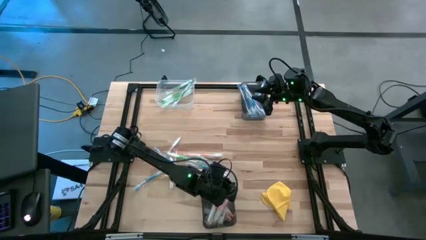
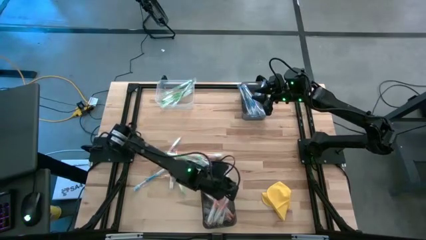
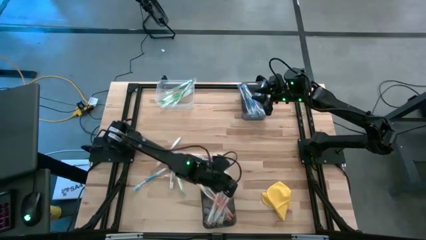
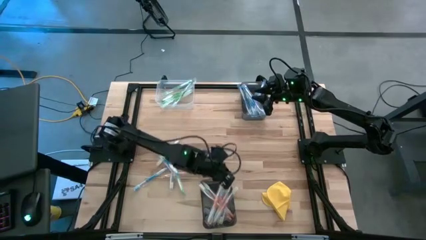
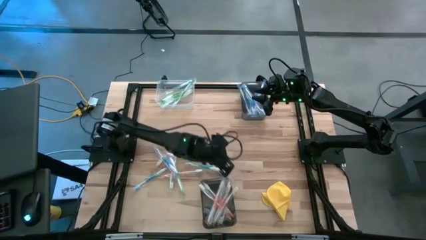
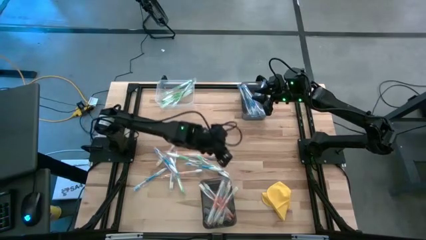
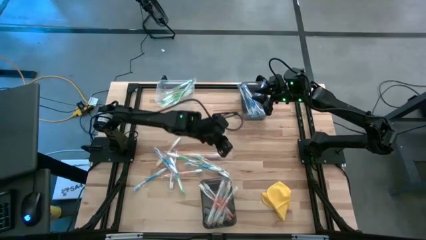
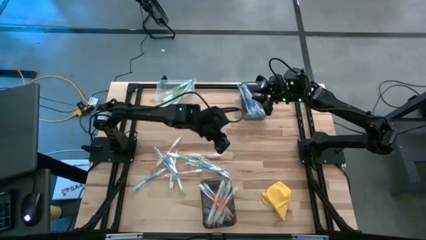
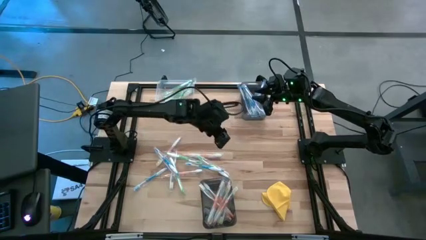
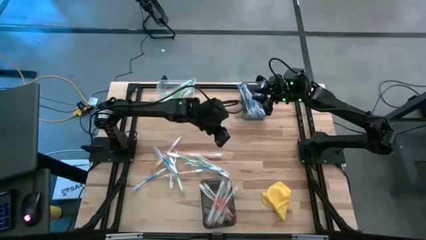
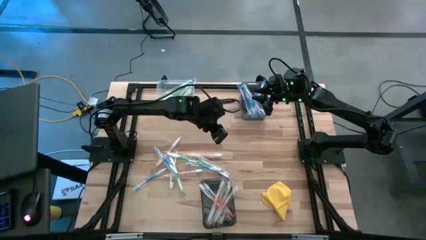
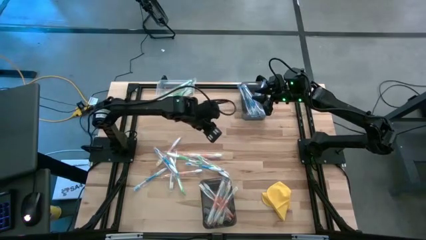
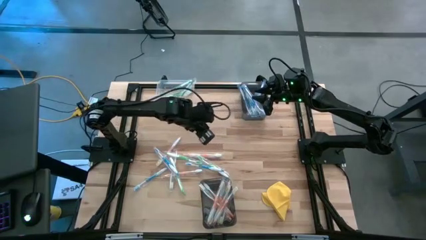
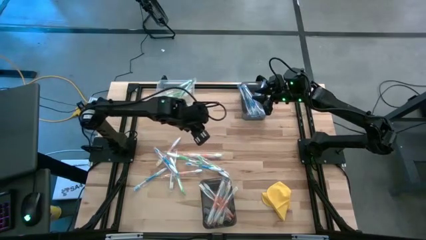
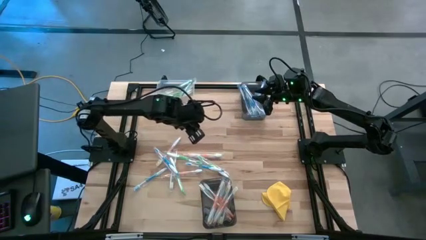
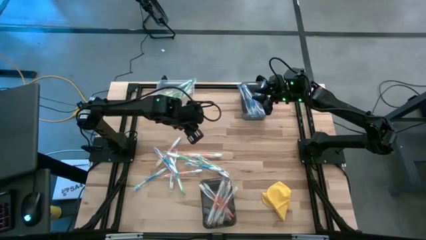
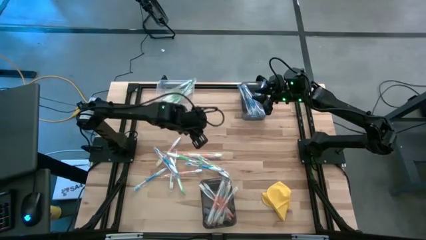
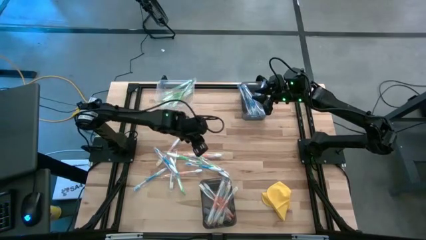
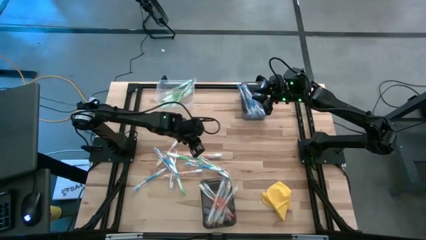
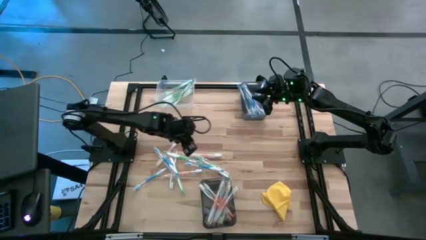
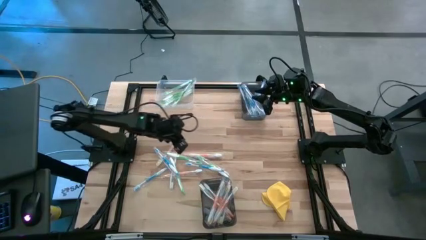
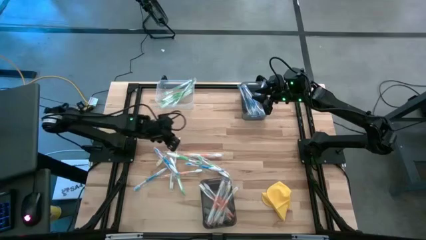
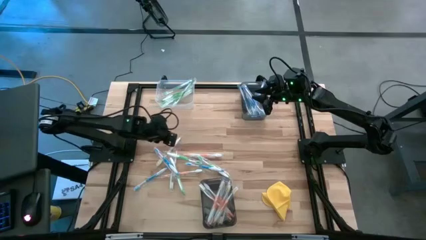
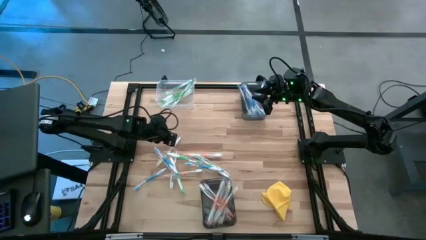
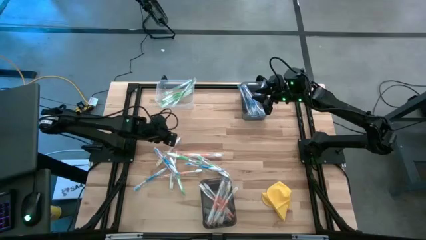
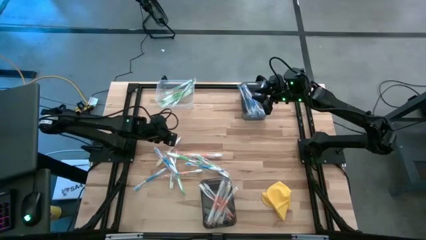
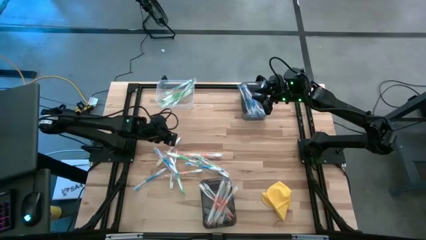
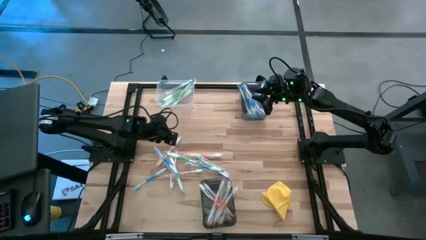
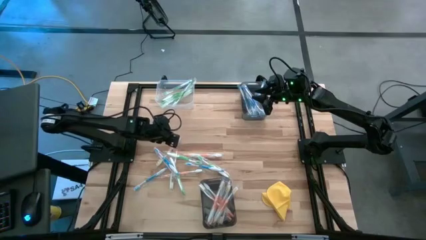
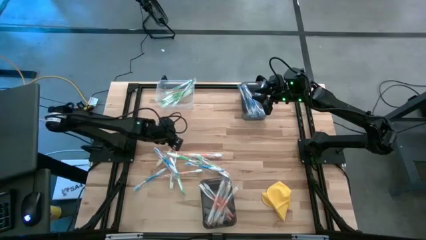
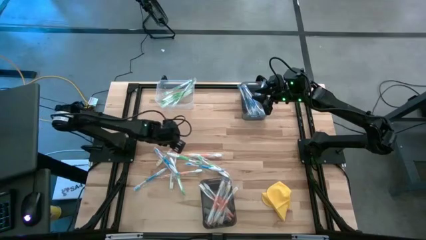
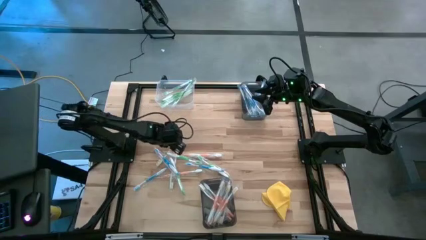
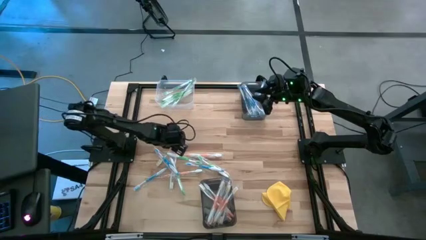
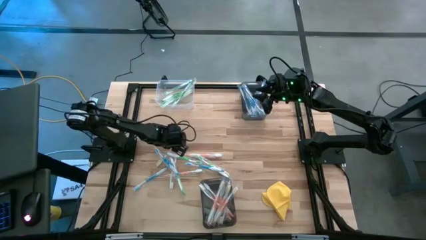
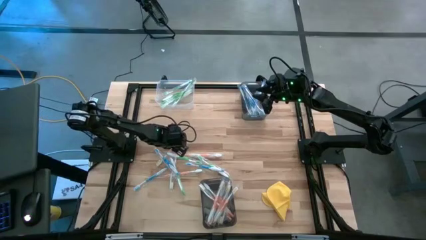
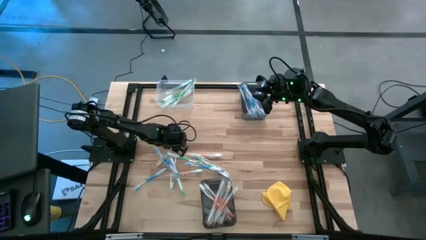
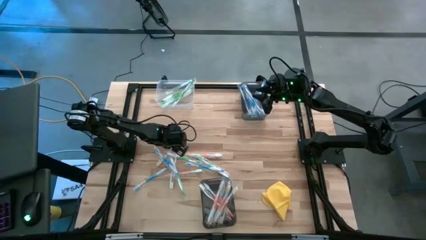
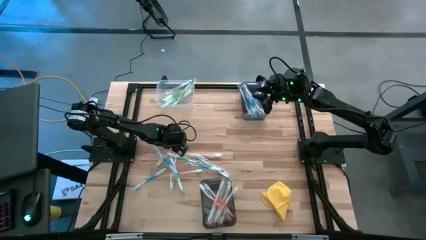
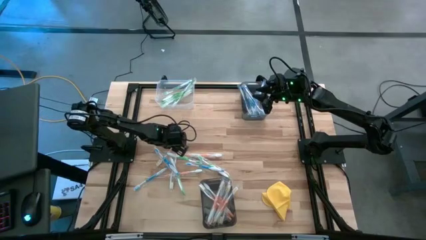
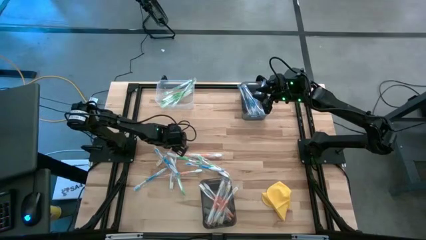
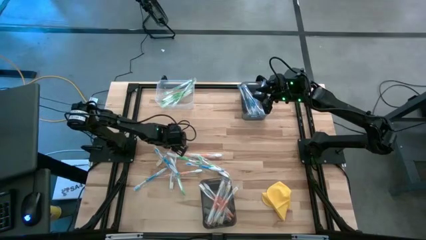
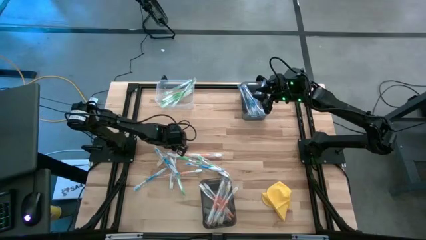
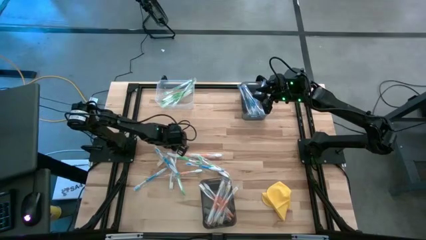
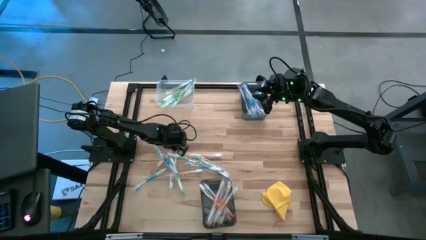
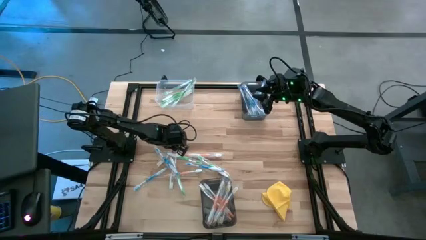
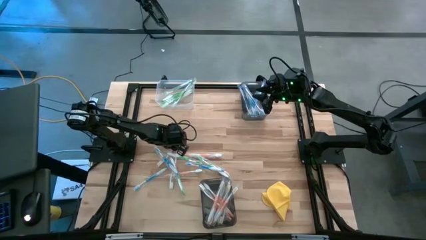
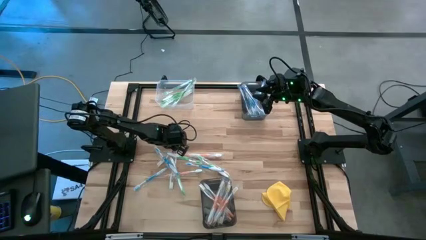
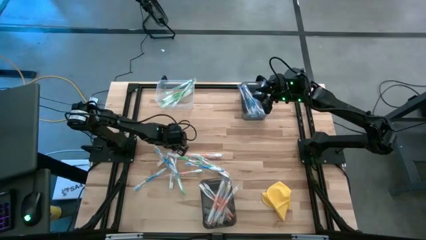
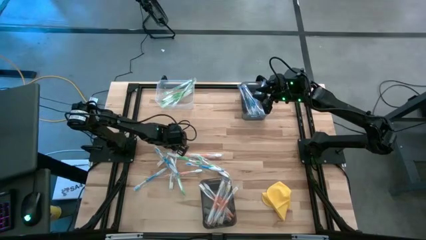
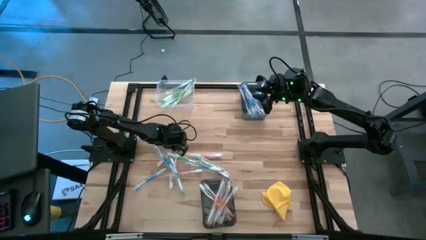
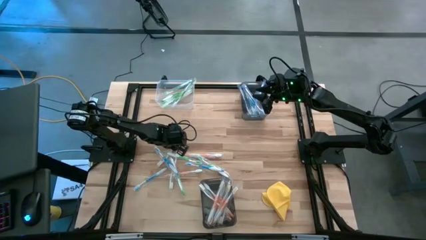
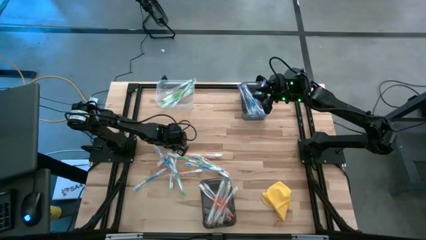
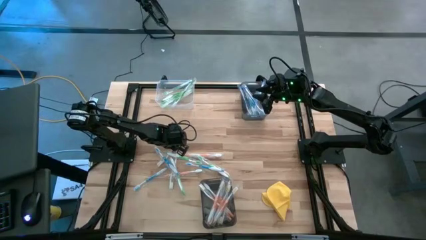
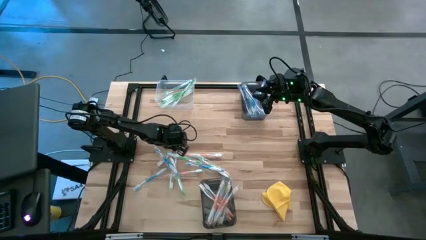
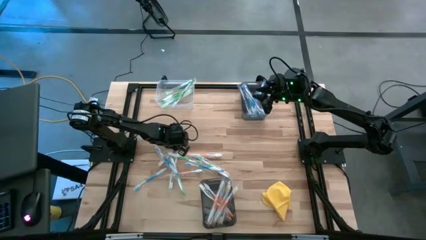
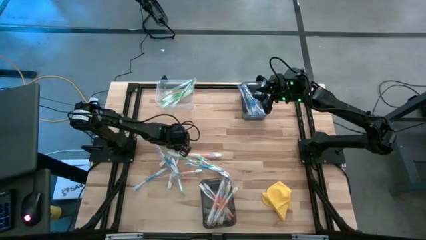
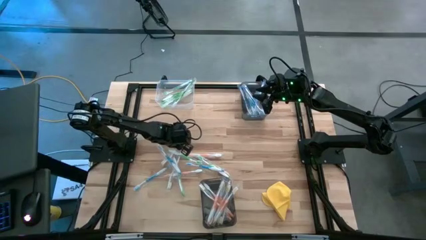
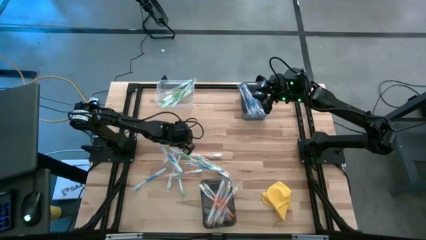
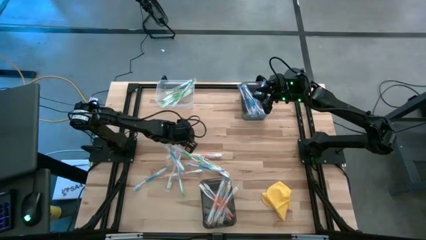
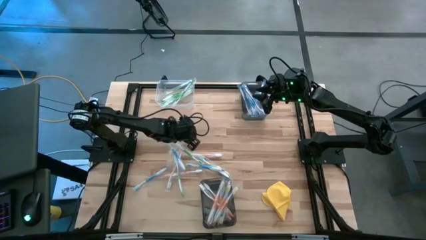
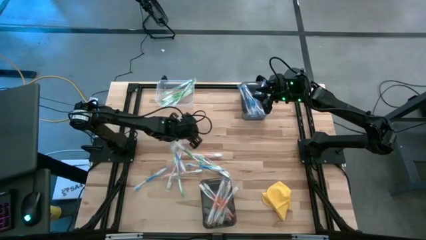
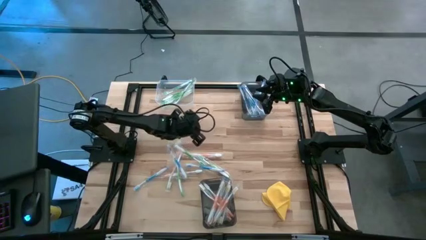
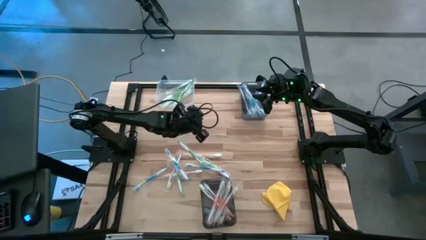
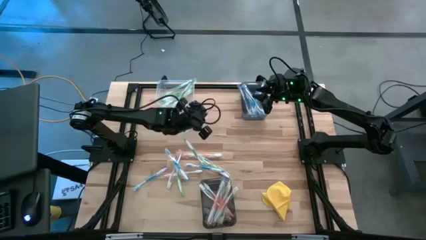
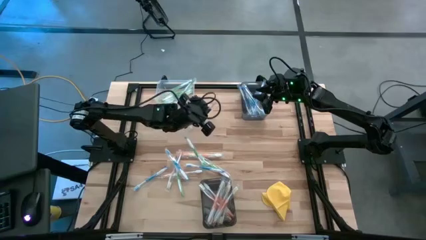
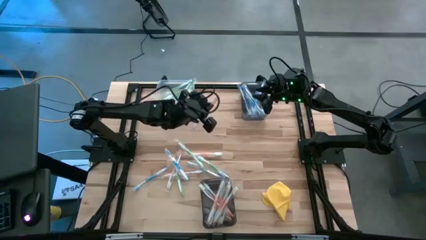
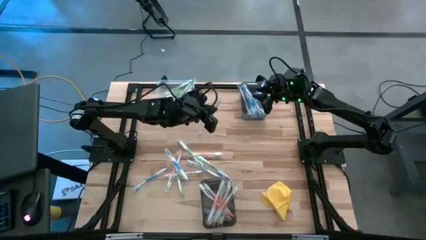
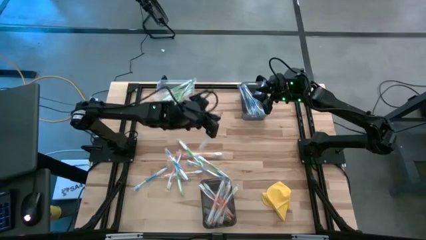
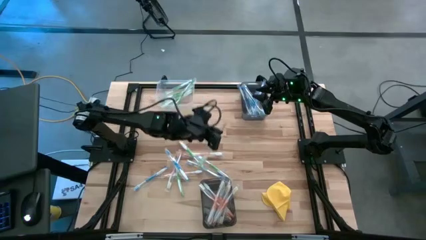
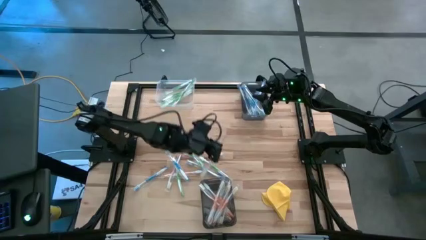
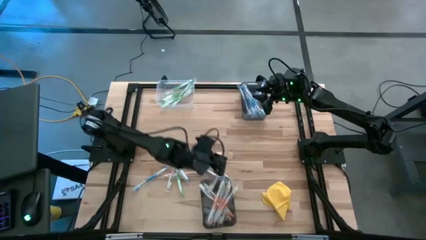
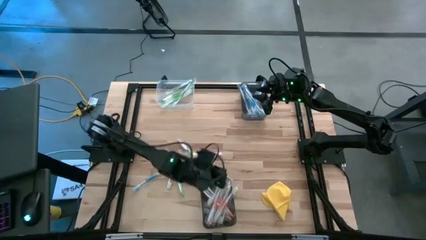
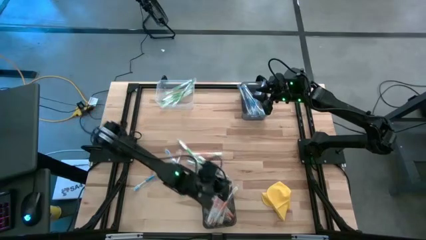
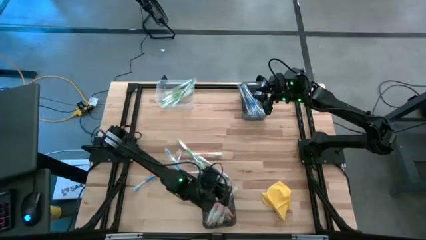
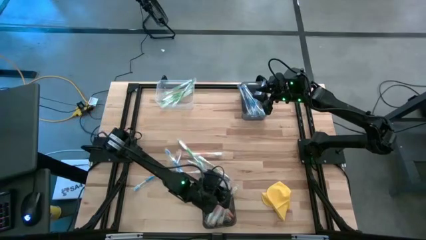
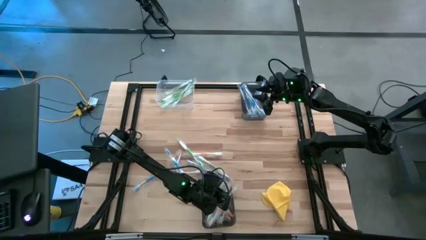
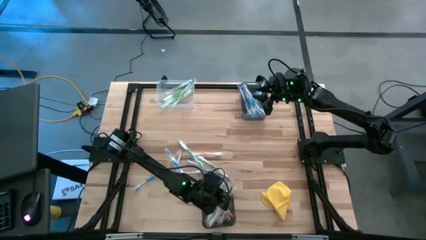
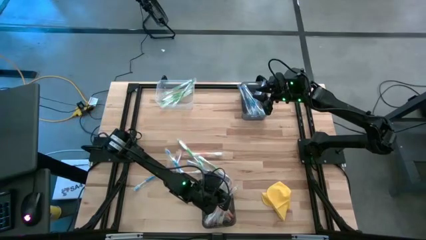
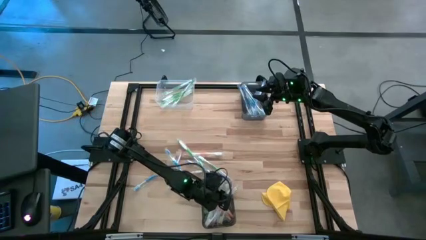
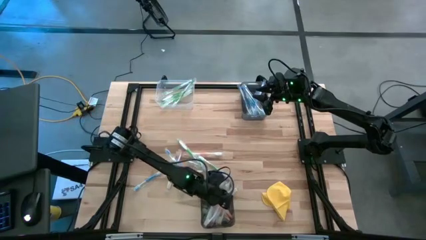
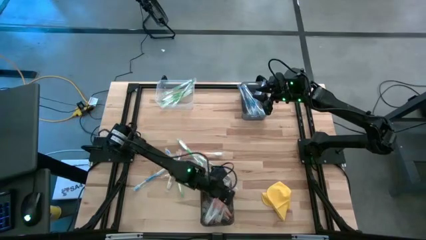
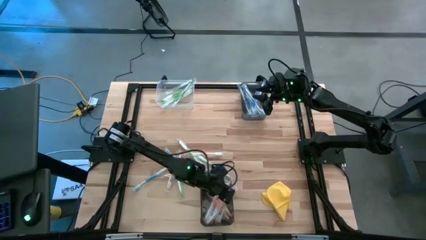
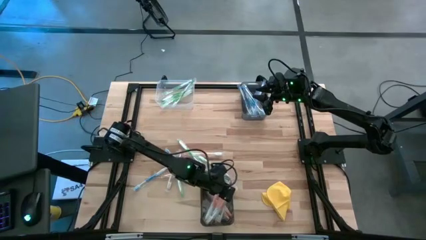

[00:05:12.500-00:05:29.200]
Task: Pick & Place Toothbrushes
Put the orange toothbrush into the bottom black bin

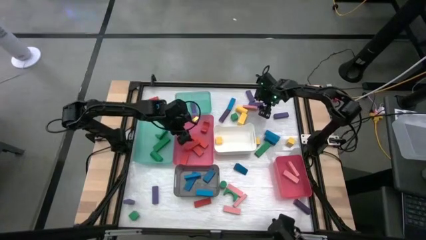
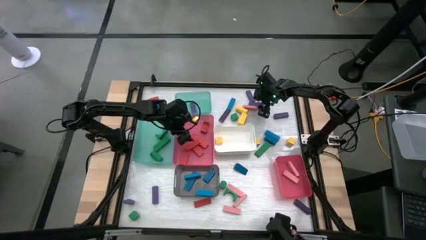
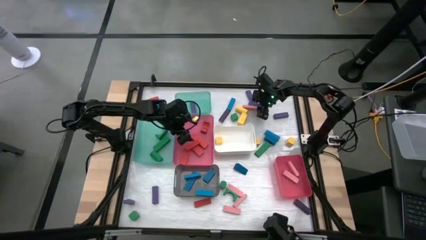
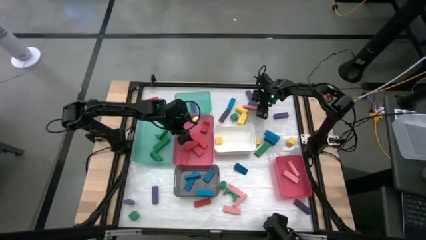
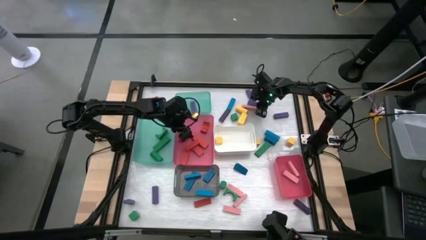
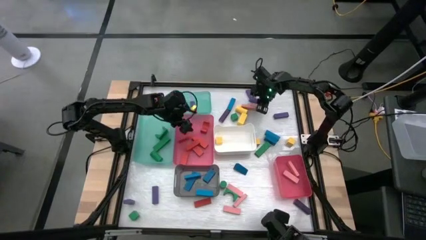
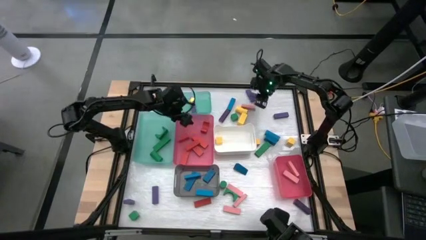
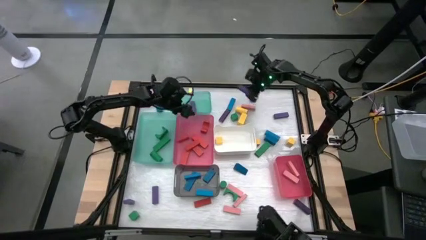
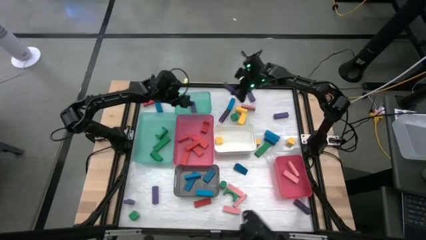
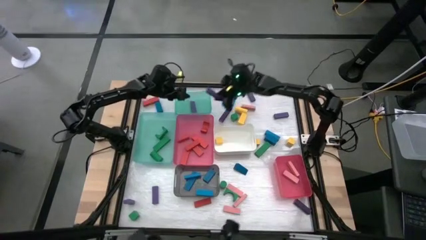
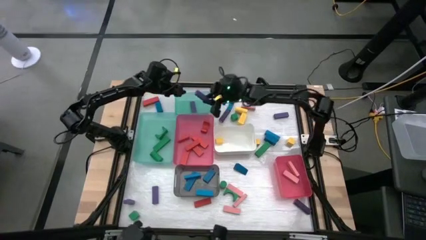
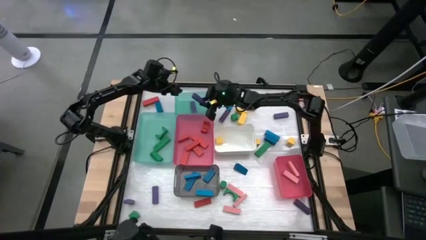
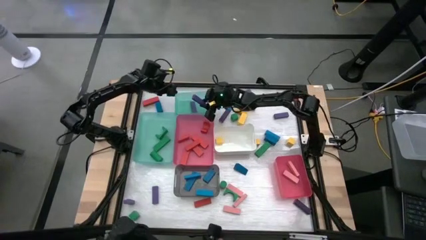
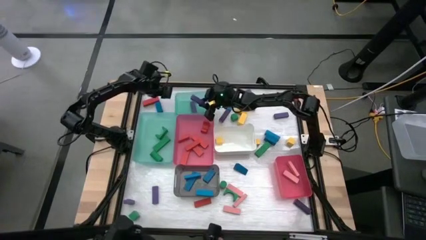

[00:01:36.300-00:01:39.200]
Task: Sort blocks
Put the violet block into the top green bin
